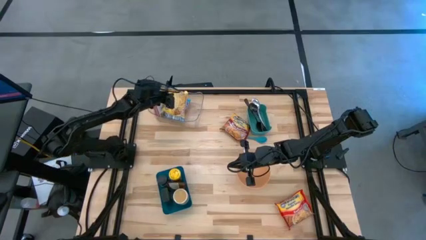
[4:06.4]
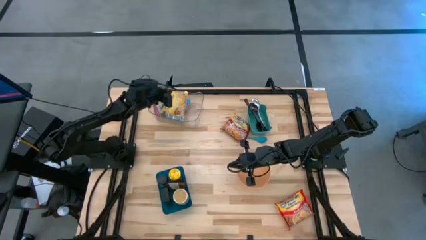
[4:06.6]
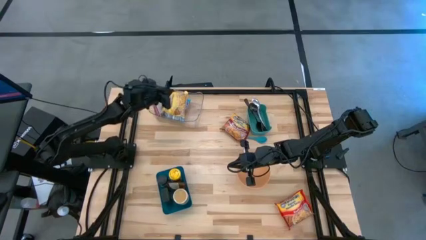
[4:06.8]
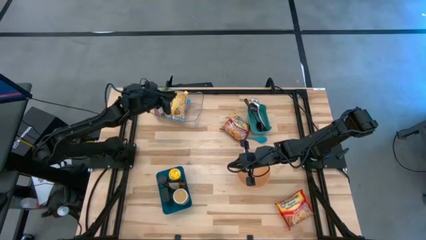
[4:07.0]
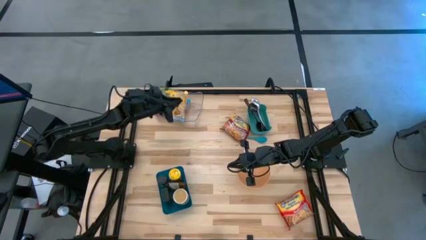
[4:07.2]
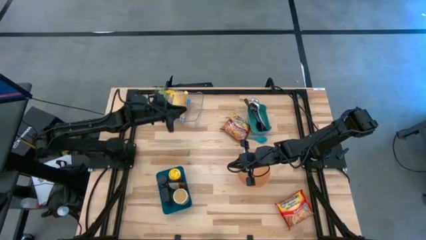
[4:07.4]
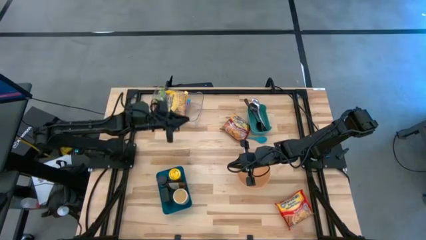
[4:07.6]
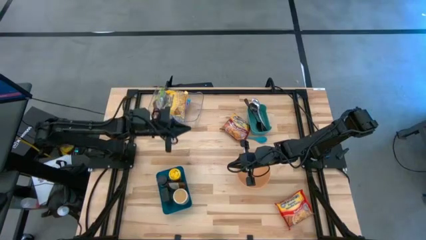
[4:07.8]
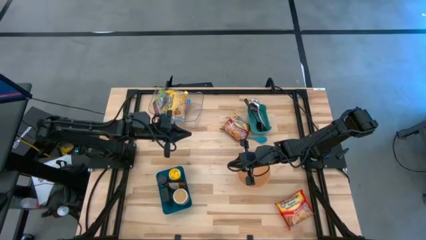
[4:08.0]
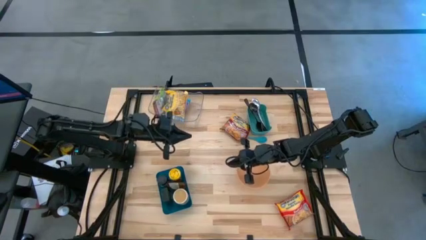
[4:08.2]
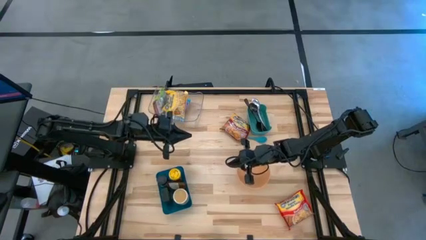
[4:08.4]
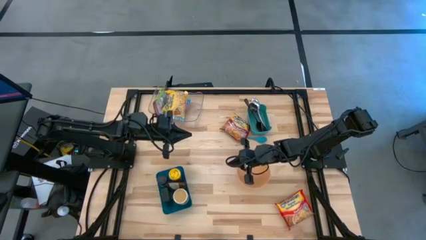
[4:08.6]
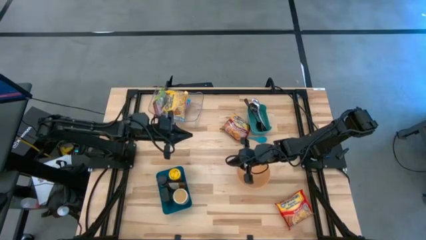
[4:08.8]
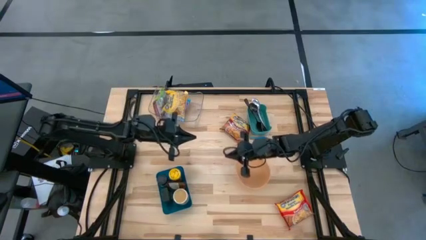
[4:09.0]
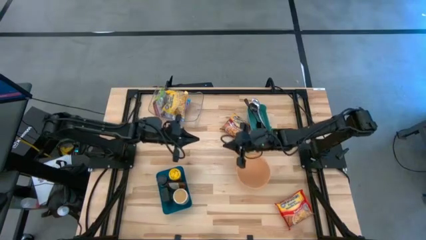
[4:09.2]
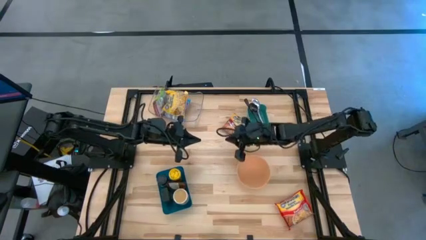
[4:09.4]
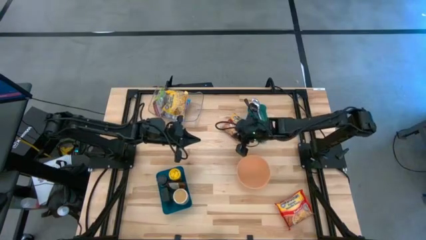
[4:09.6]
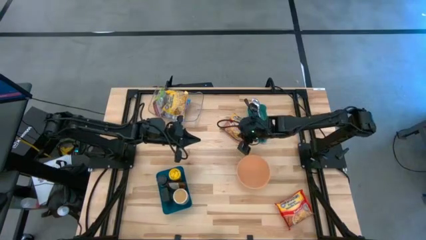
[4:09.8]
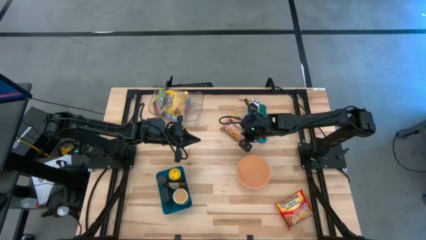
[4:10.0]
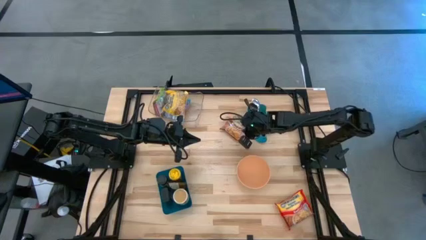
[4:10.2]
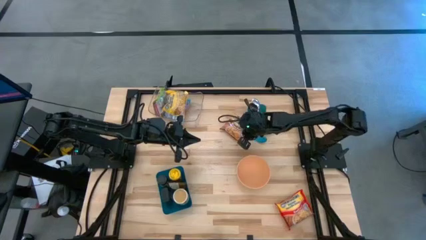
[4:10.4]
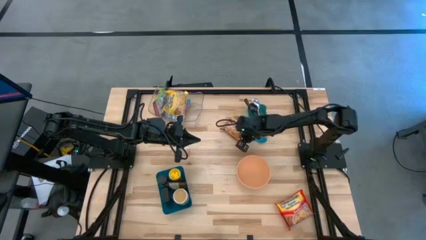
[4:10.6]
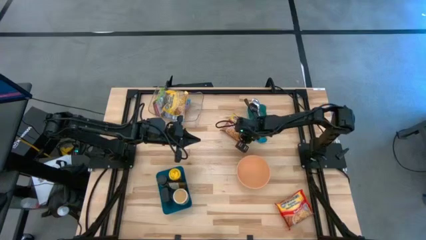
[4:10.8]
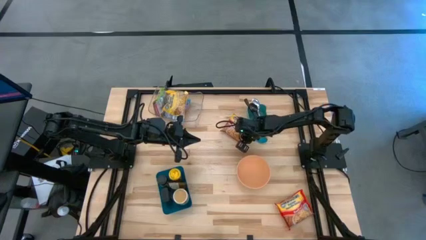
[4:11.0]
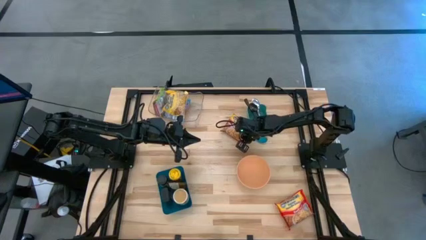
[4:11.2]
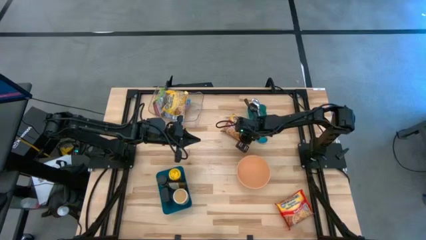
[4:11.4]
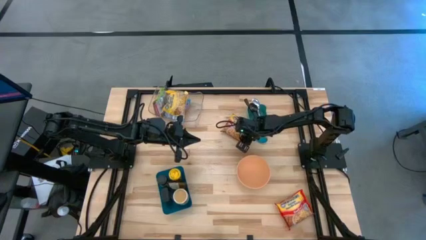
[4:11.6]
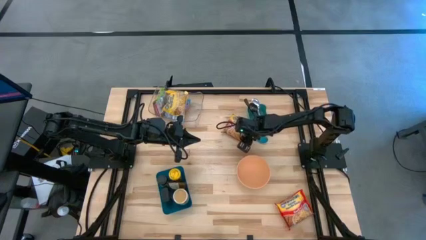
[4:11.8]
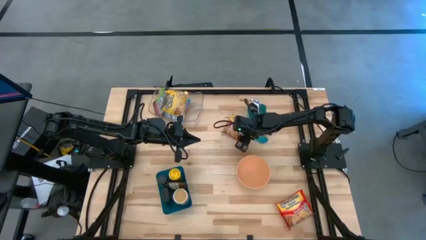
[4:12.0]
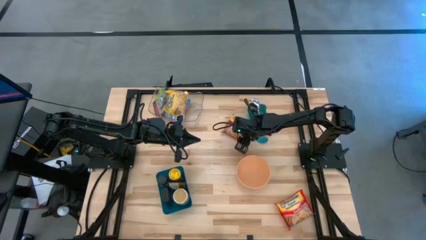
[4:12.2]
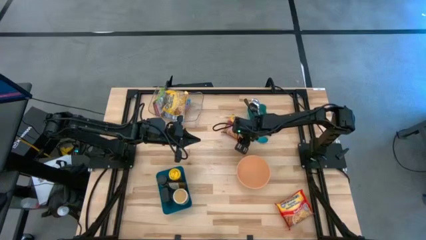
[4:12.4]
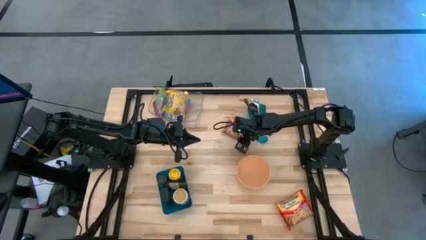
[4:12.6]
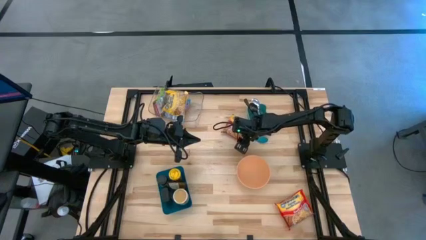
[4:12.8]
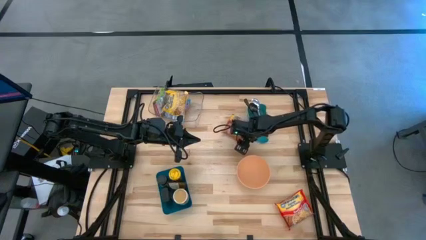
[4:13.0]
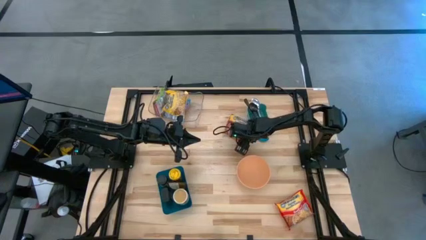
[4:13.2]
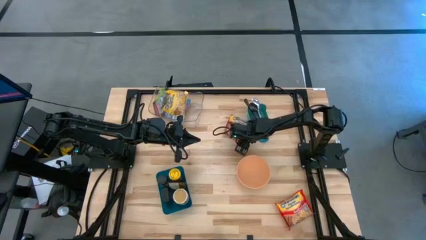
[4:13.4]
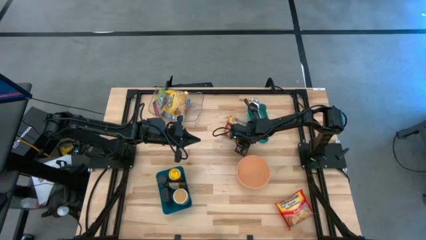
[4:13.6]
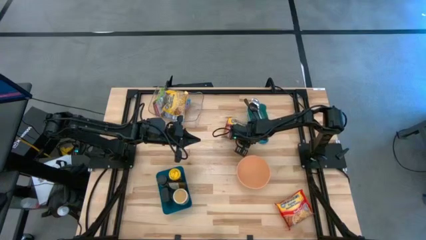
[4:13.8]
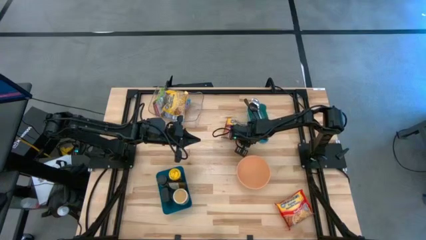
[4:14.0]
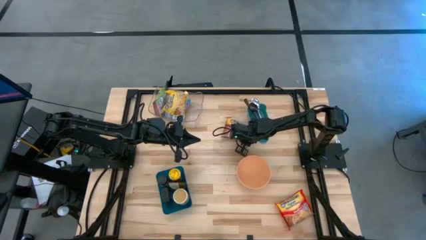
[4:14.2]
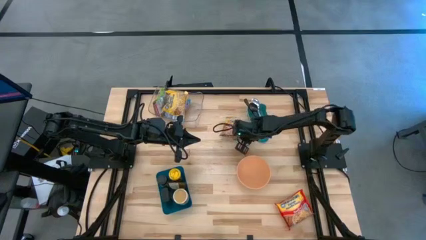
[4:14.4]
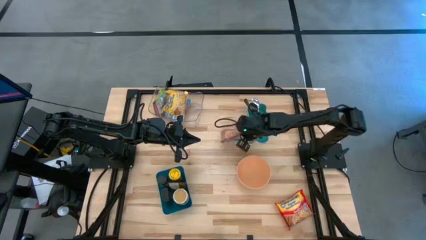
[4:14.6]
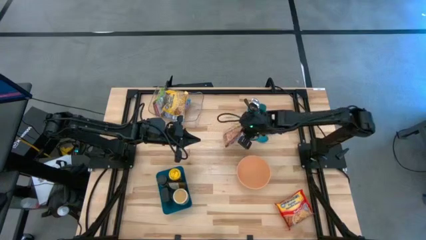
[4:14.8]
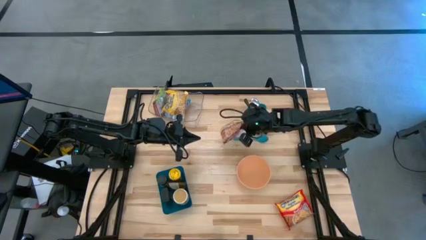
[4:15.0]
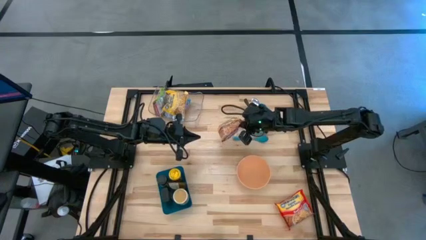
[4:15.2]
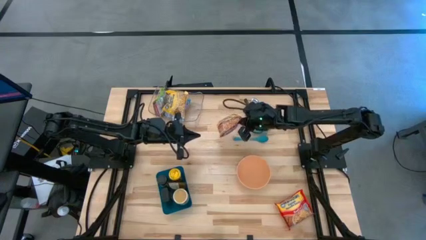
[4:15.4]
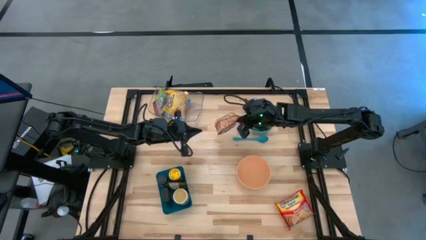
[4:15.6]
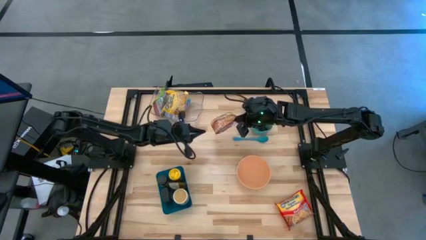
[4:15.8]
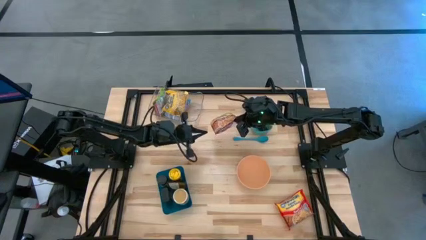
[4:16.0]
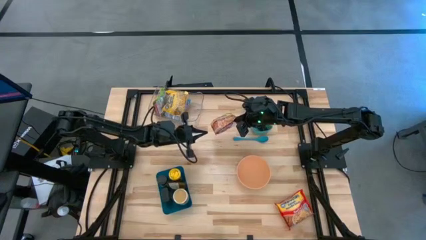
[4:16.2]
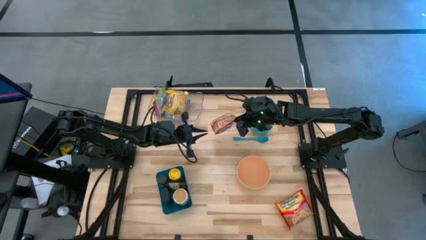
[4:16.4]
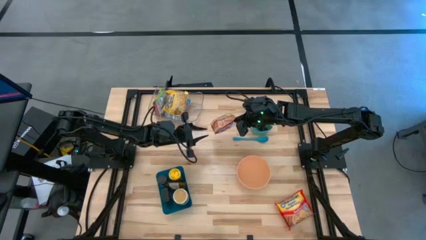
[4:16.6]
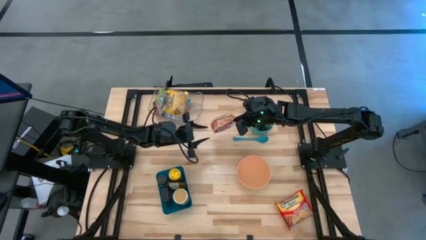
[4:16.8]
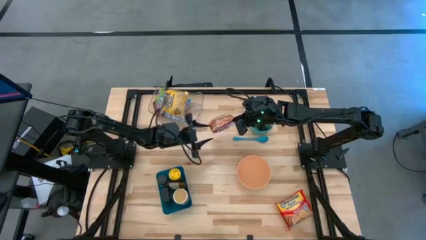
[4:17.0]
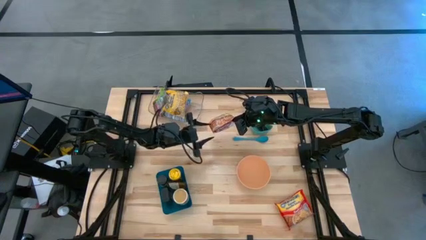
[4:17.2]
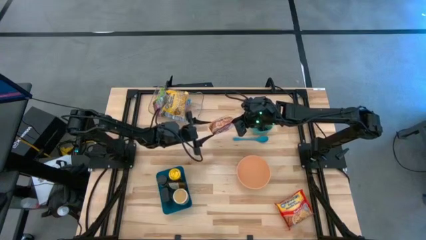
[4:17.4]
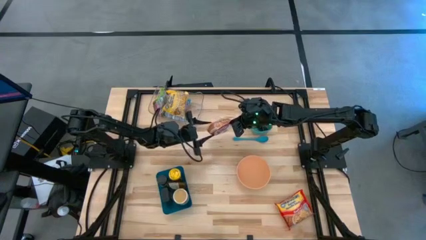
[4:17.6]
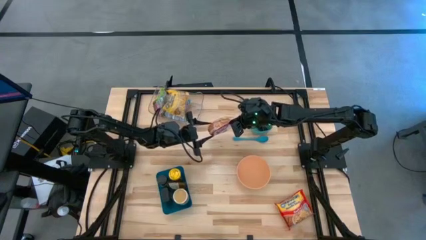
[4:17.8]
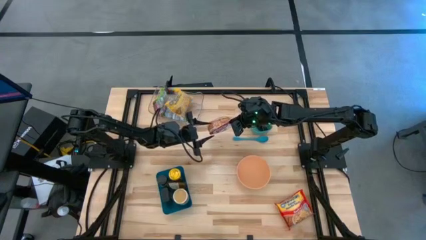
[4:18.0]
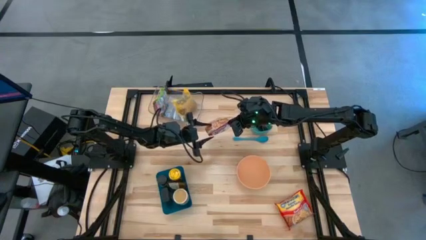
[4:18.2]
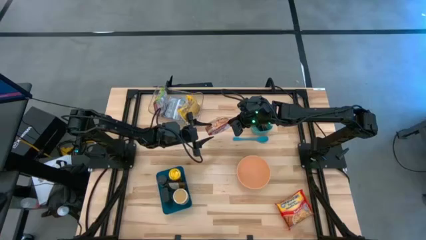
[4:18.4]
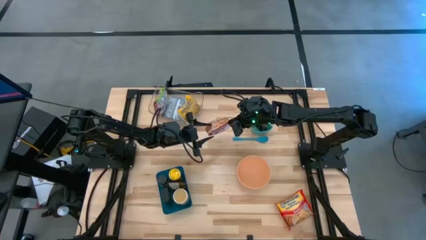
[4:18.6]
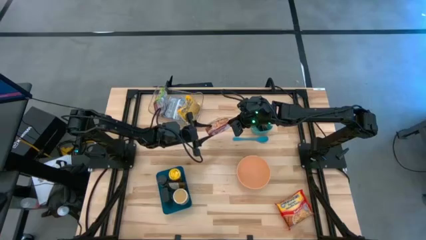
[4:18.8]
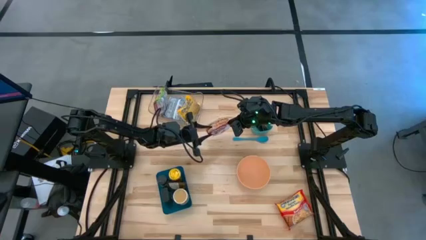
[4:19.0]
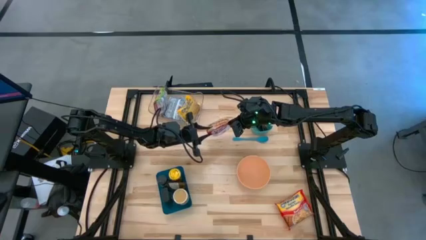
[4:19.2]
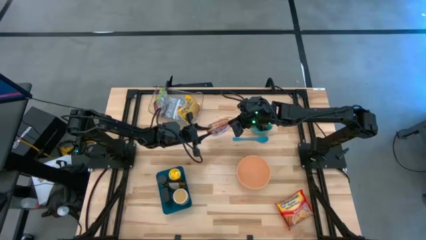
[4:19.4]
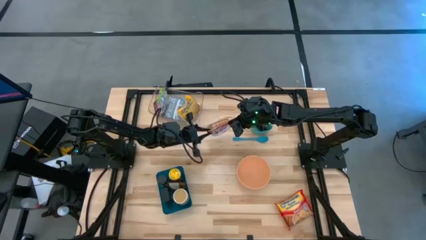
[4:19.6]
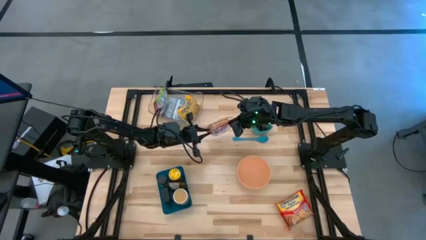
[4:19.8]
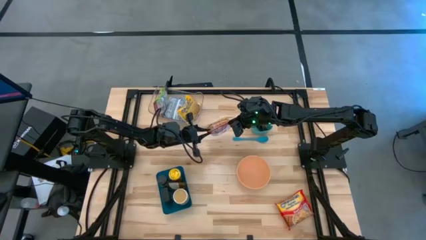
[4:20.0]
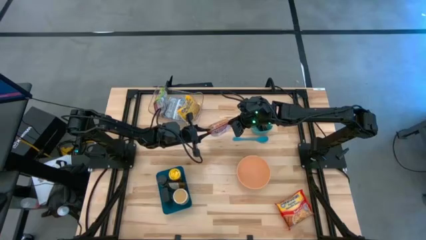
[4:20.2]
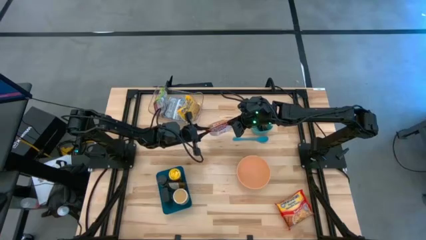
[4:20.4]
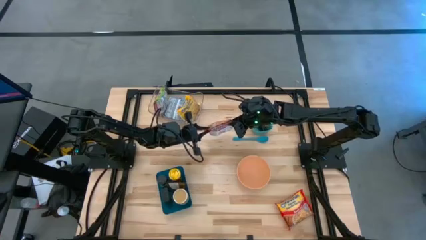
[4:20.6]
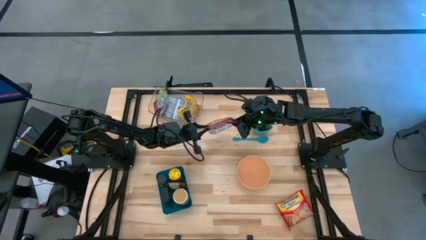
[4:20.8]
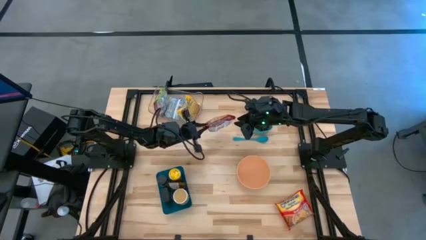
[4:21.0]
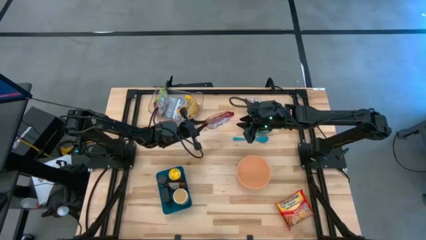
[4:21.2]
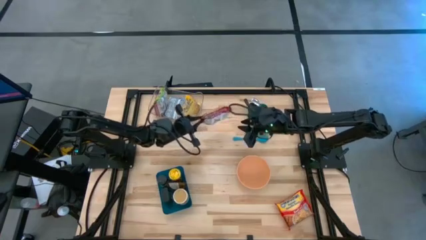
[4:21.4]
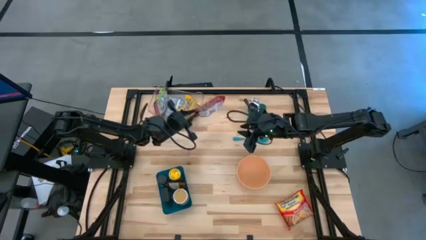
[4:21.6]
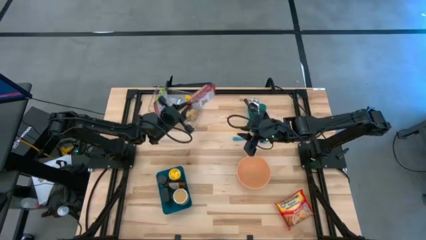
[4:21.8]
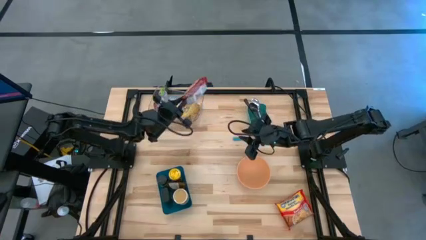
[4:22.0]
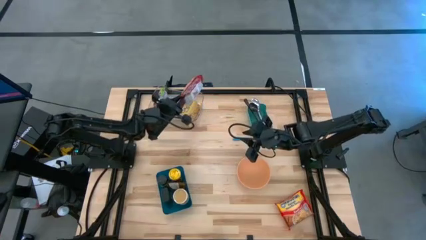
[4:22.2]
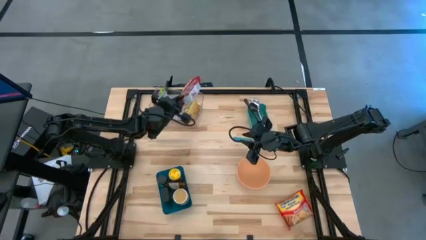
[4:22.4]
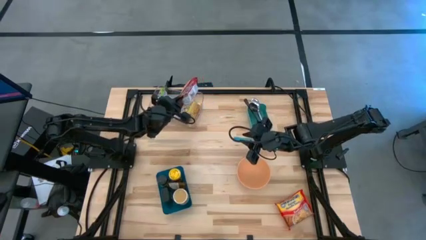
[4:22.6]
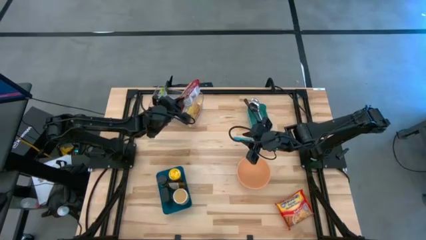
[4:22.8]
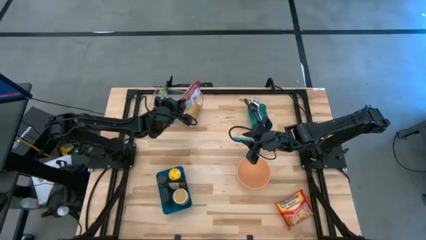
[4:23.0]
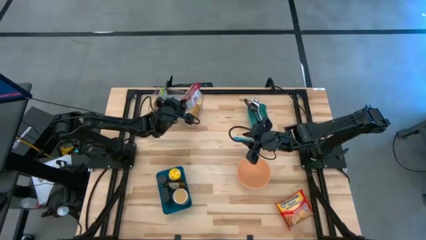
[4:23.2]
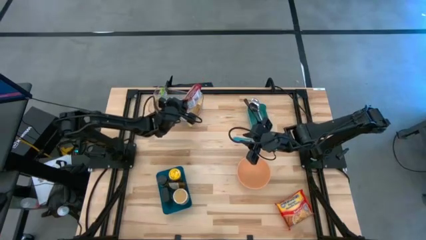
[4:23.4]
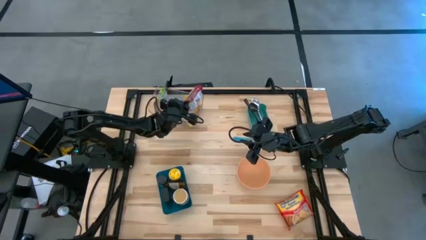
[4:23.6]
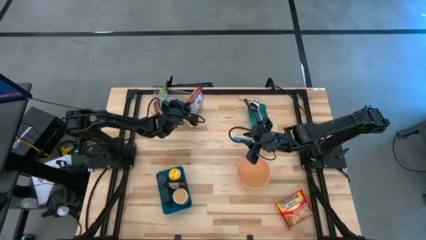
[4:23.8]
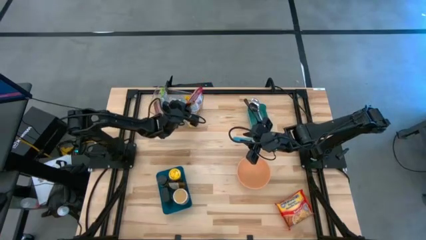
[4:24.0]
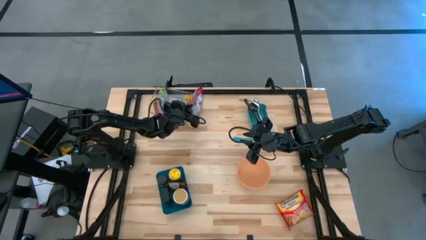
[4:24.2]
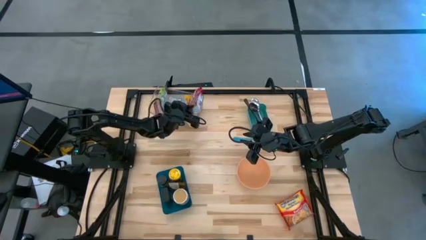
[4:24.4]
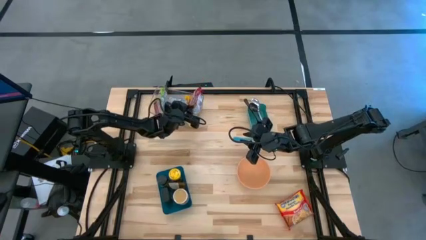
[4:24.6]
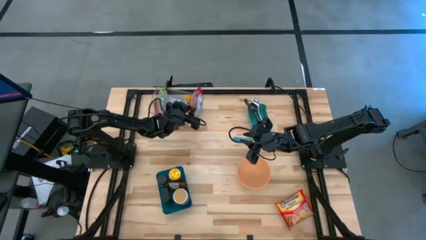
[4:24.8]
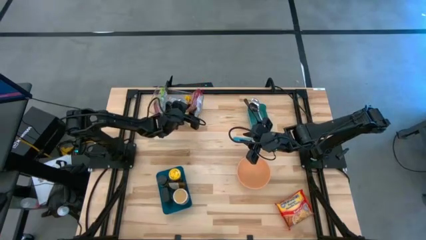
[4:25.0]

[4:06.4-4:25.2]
Task: Pick & Place Food Item
Put the dark red noodle pack into the transparent bin
